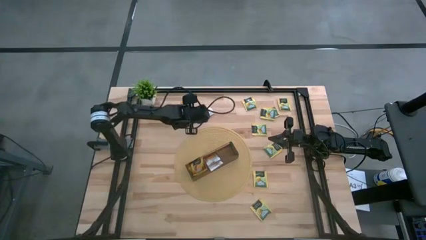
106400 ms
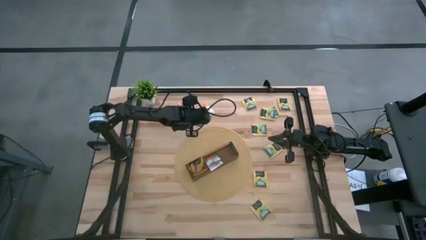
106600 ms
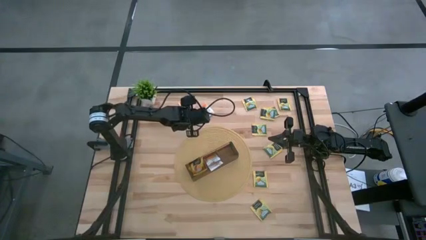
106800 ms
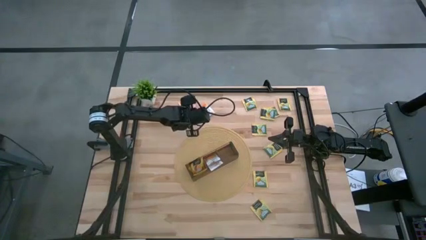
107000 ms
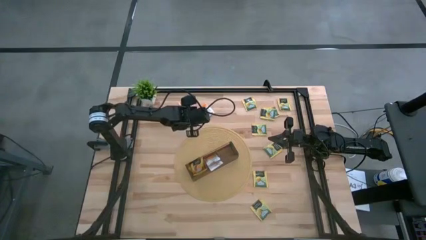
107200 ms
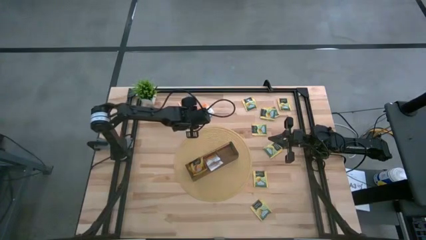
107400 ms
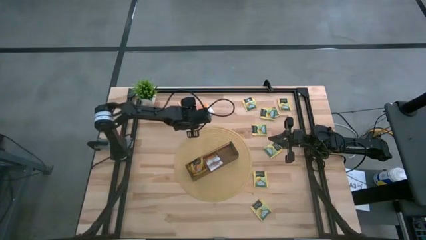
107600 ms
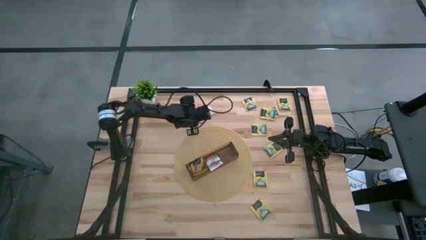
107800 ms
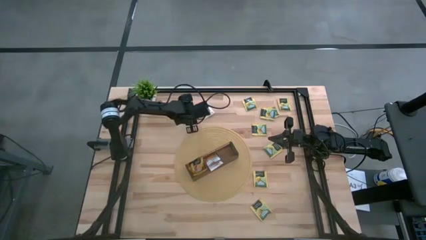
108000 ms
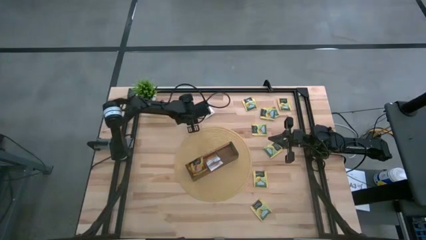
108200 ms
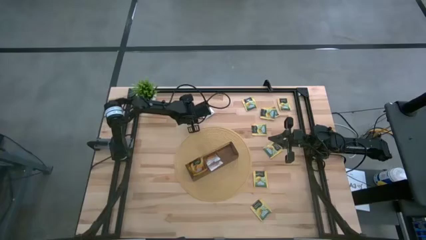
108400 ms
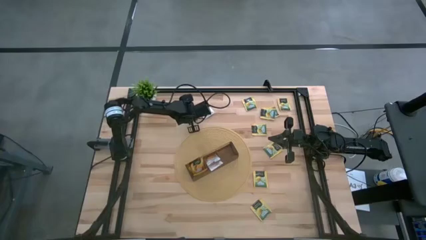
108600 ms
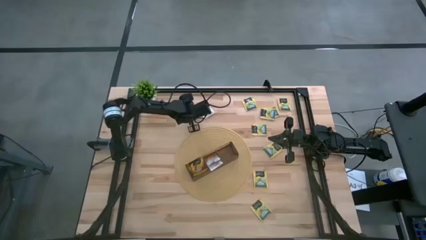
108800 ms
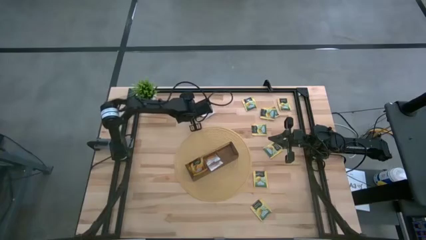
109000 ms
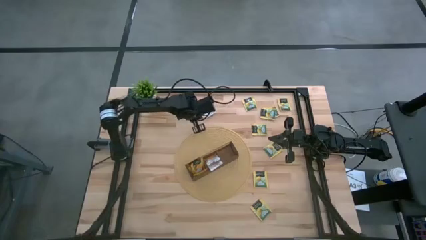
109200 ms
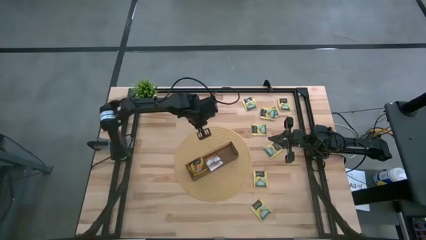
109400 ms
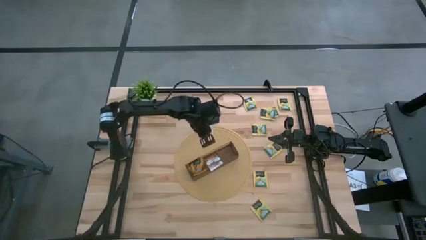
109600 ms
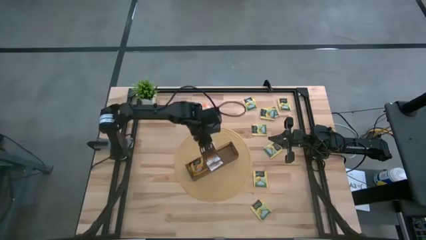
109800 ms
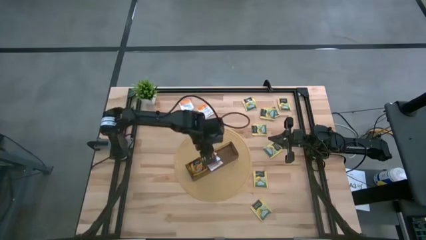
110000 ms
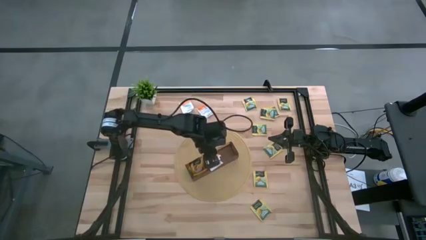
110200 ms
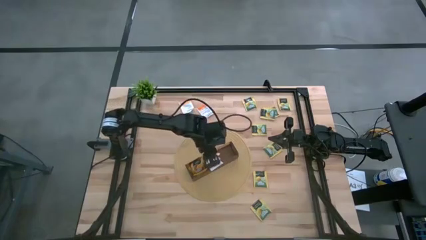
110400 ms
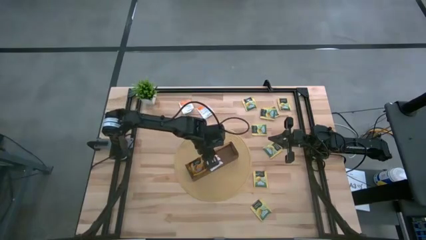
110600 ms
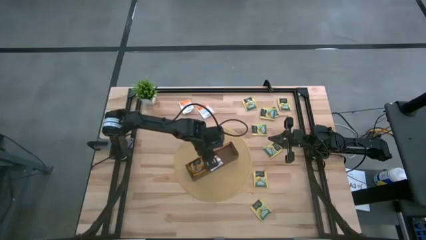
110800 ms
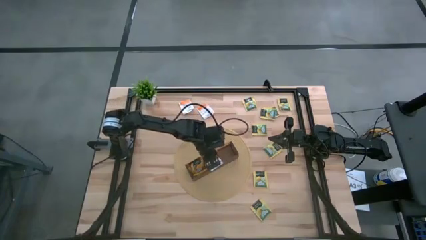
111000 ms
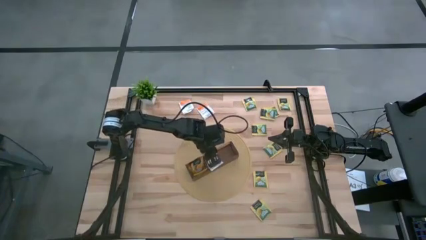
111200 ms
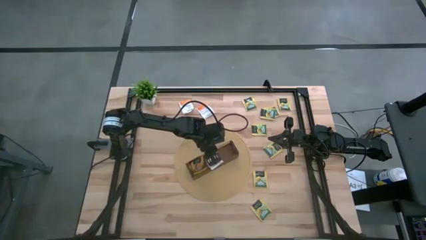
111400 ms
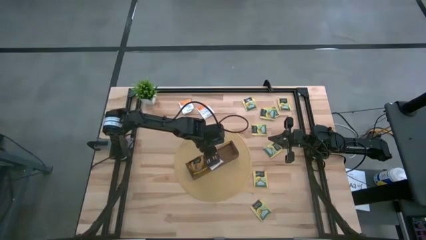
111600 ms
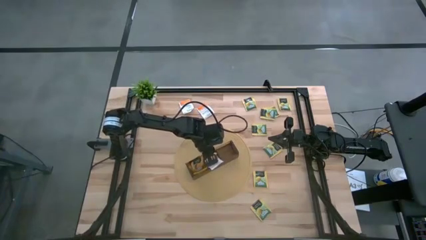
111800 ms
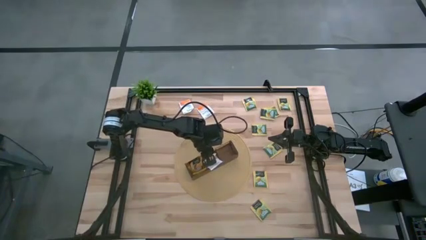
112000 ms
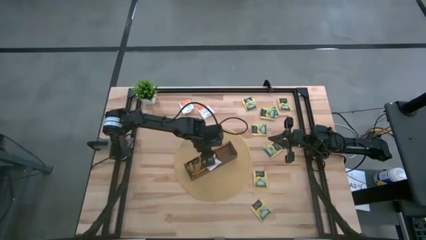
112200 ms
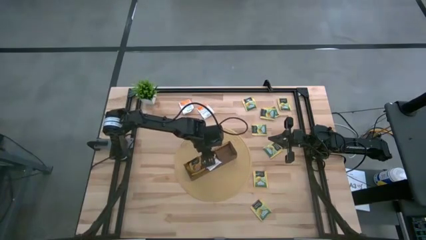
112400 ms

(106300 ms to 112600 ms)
Task: Pick & Place Tea
Put the middle orange tea sachet into the mid section of the wooden organizer

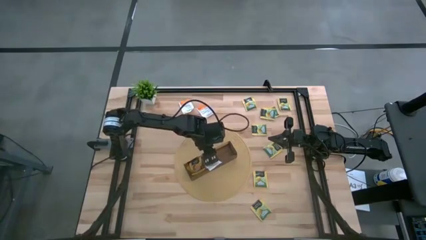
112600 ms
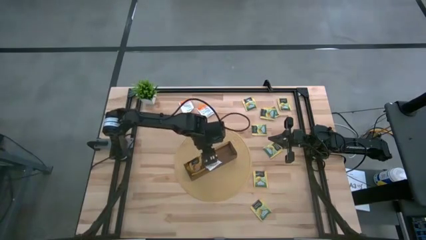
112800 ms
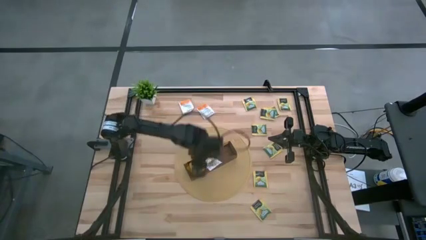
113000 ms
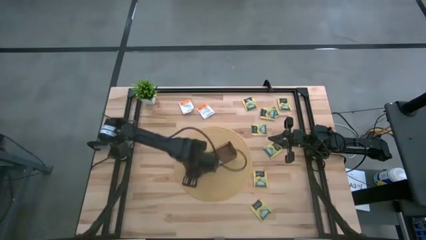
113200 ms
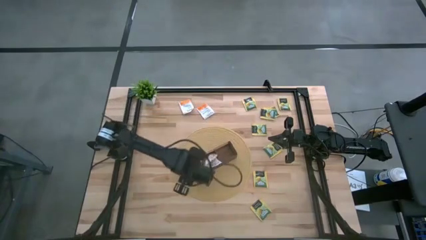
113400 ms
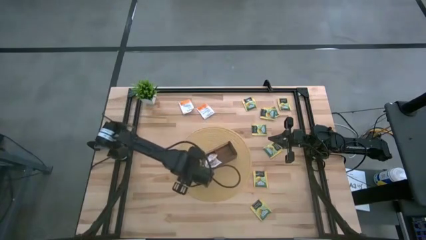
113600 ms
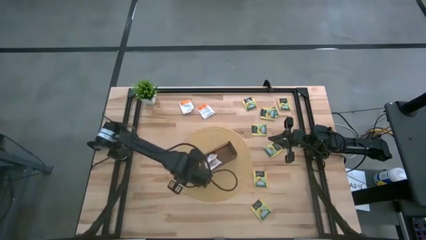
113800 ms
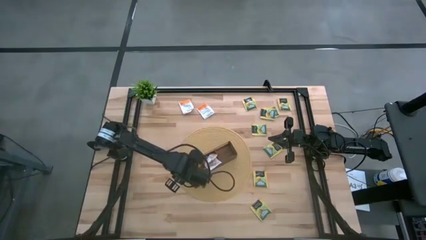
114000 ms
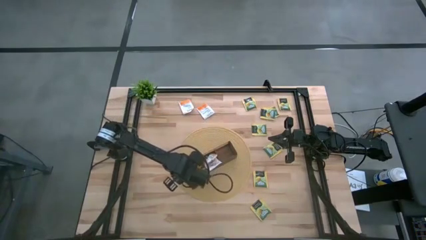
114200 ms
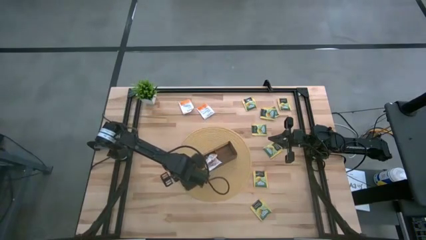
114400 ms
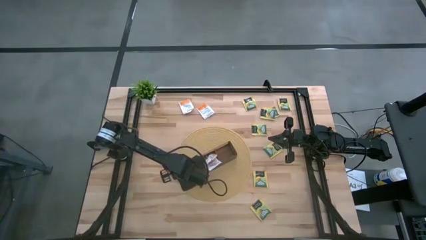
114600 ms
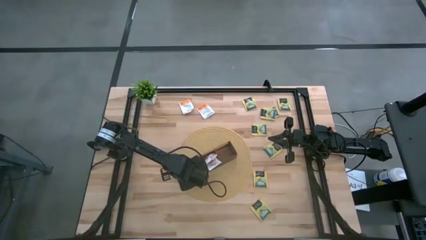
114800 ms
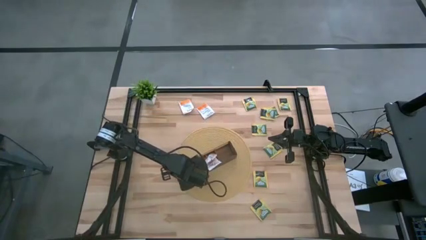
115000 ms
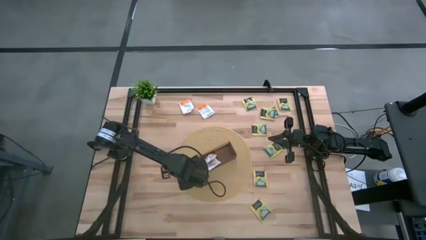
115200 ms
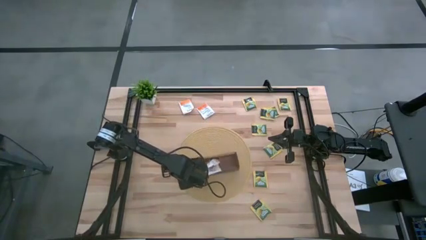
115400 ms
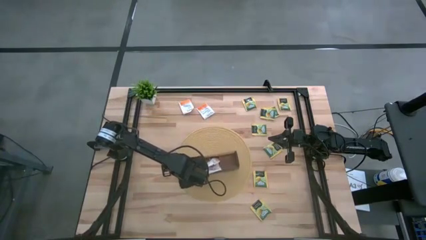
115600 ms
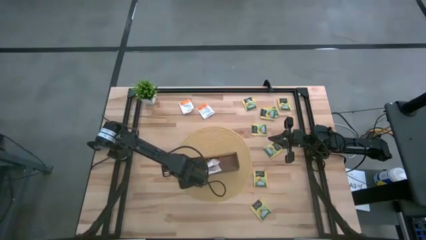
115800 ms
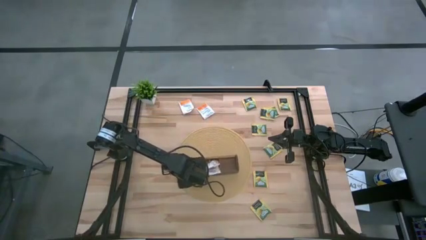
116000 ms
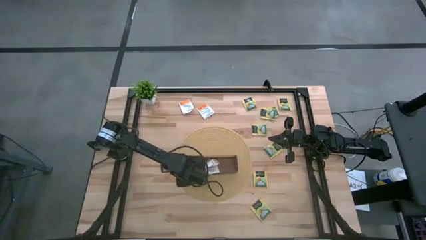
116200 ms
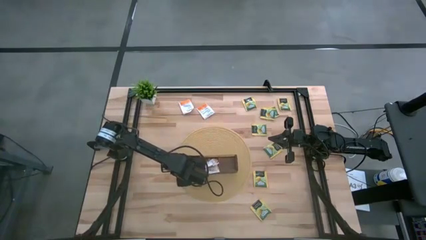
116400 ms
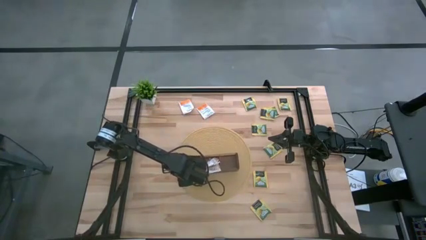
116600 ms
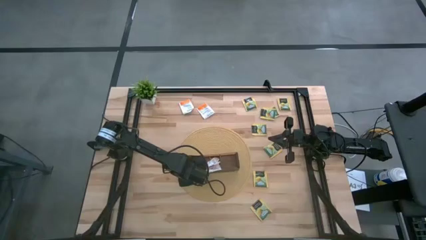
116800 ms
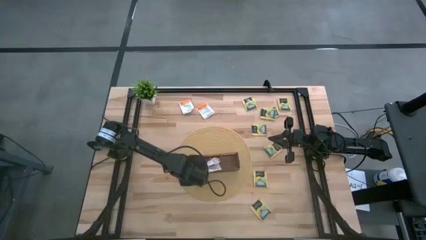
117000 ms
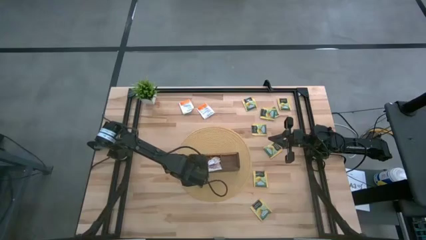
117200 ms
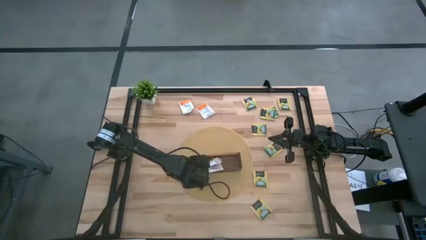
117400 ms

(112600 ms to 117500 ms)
Adjust the wooden organizer on the table

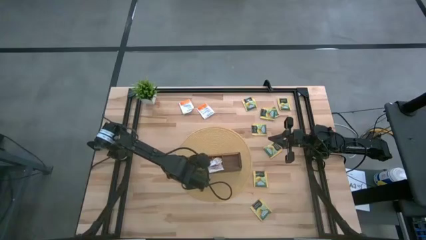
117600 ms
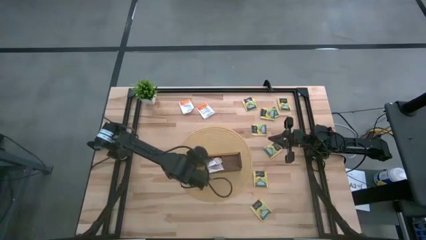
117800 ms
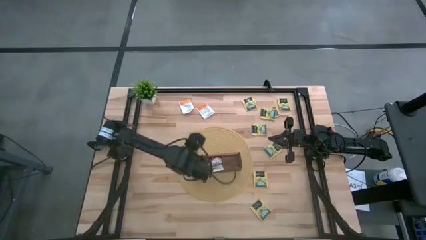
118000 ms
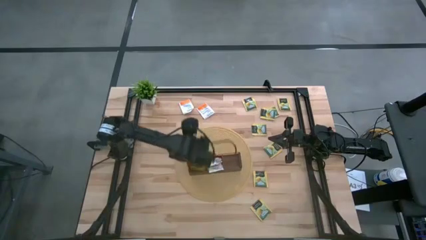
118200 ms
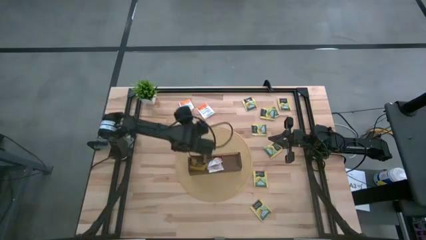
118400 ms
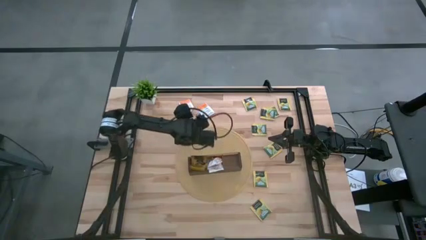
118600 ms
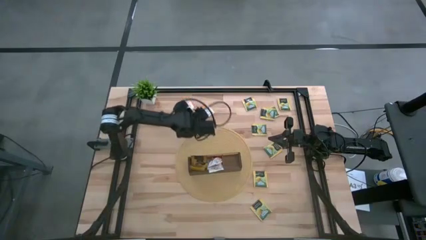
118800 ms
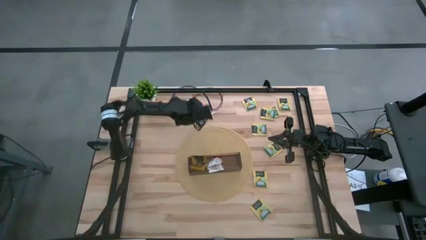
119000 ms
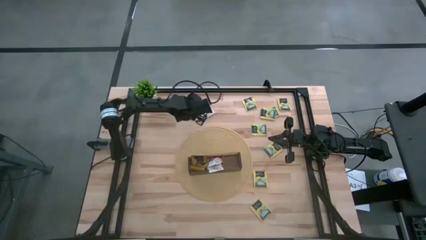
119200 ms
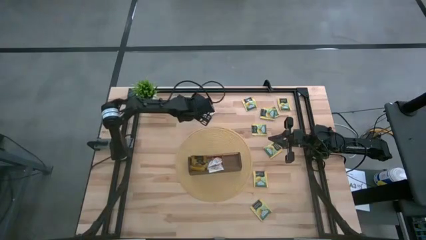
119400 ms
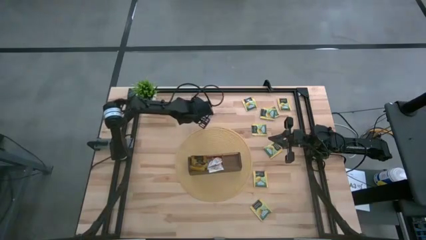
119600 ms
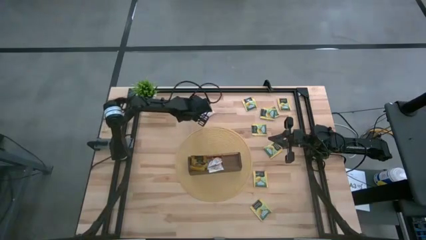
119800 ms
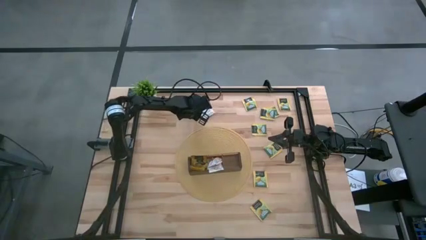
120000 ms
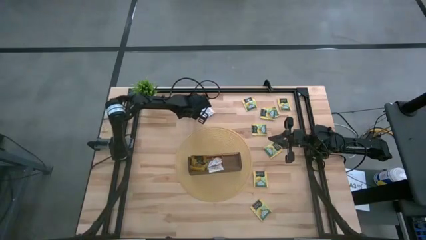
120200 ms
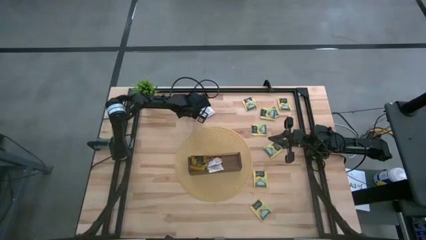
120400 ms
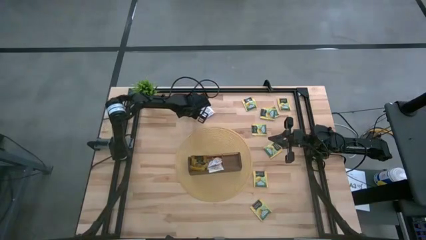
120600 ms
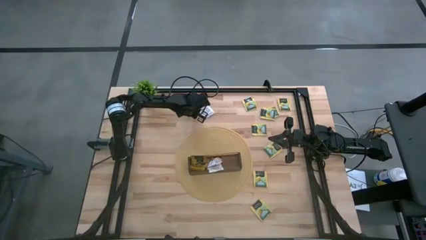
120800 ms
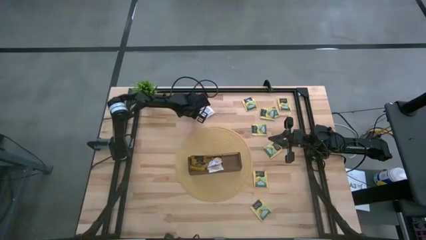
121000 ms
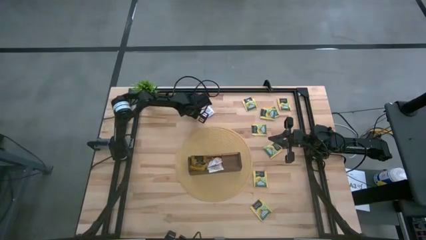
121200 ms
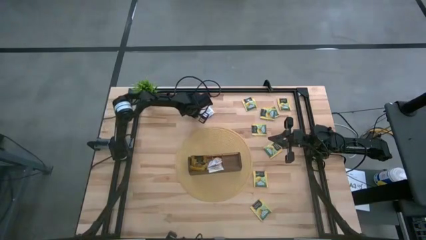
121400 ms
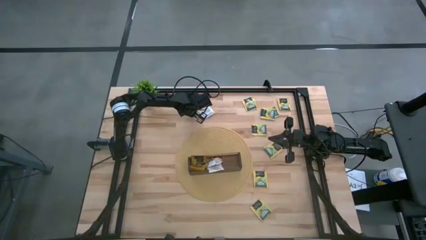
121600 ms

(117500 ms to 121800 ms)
Put the left orange tea sachet into the mid section of the wooden organizer
